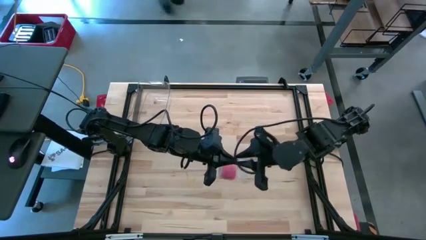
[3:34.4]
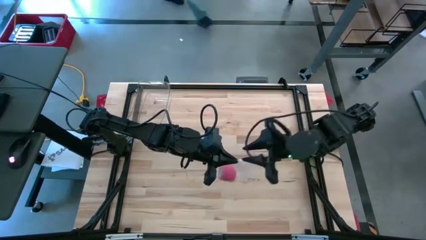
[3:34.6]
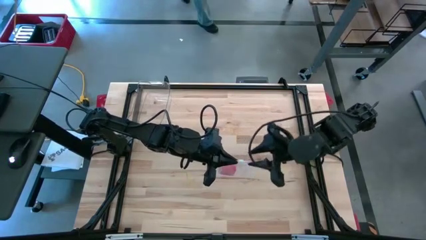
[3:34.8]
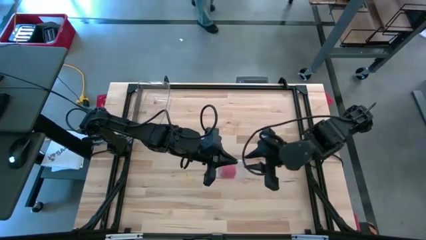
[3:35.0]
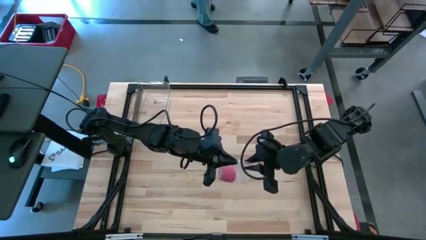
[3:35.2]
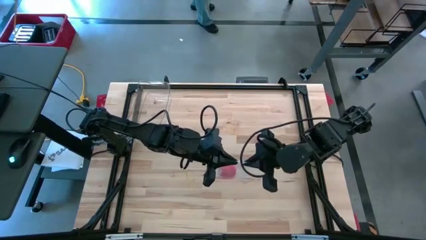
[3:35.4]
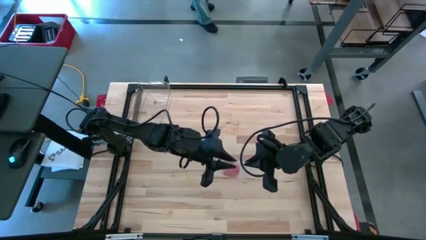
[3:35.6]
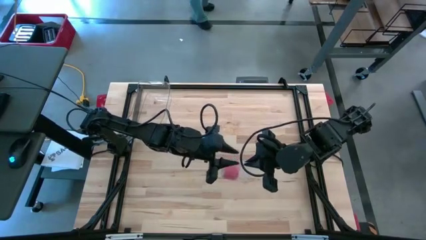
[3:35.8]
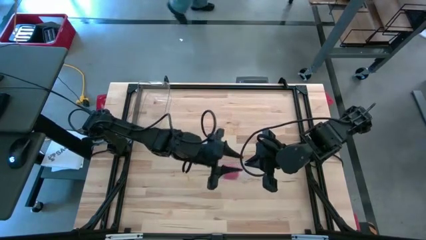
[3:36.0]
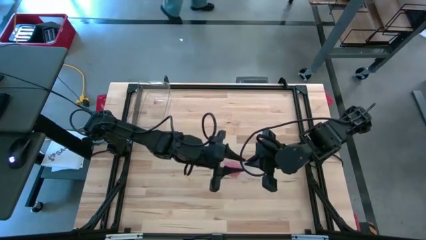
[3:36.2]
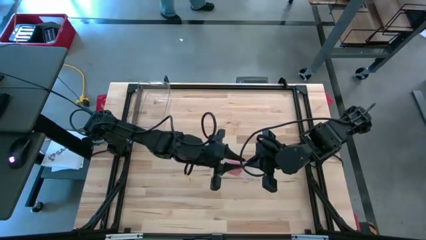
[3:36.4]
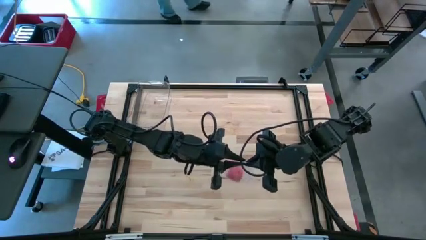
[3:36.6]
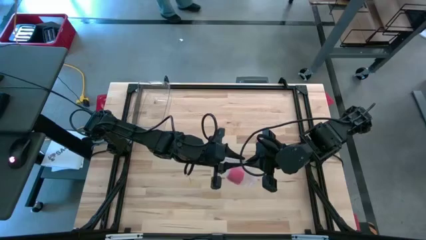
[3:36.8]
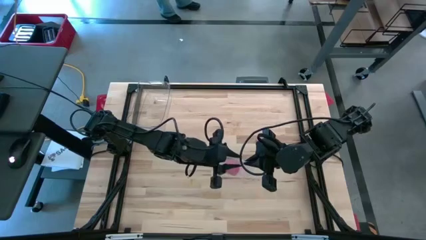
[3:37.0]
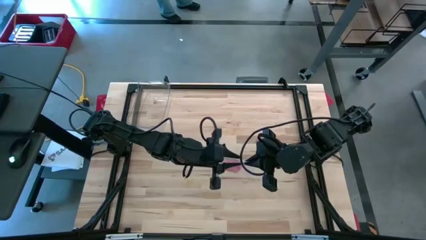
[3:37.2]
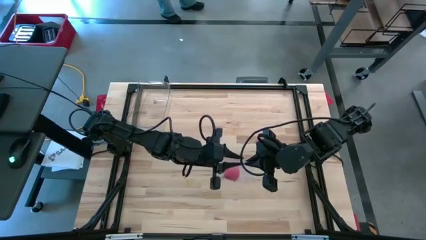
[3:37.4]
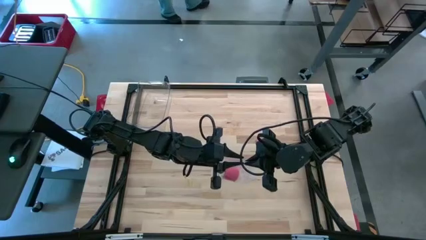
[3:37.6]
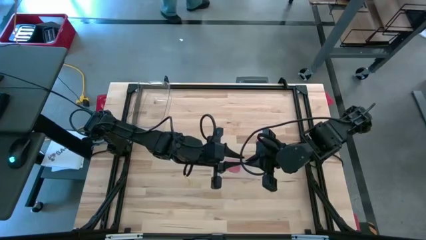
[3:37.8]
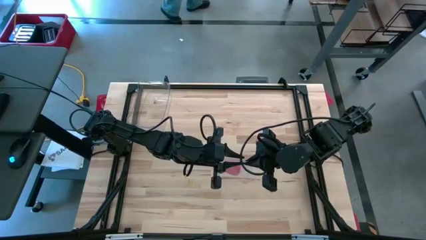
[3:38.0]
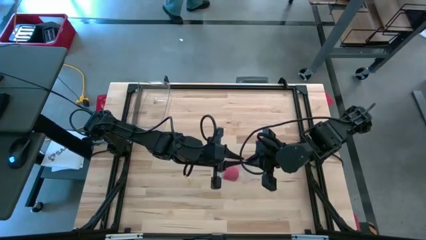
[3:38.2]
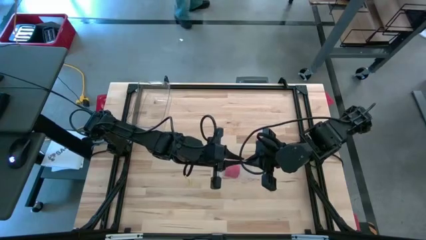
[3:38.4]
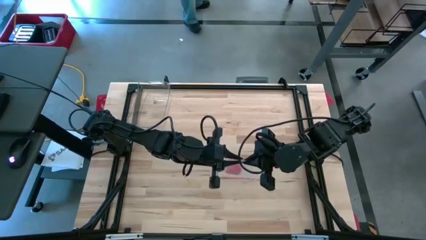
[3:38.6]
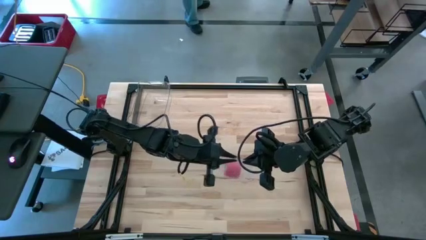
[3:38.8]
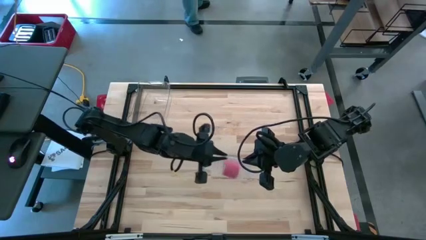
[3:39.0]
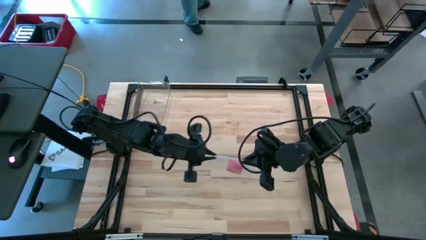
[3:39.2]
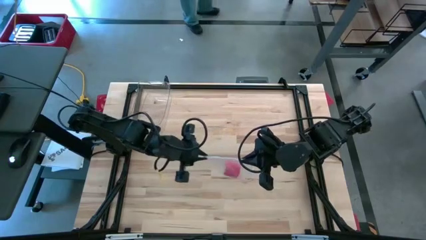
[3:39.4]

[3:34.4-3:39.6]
Task: Roll bandage
Close the transparent zip bag

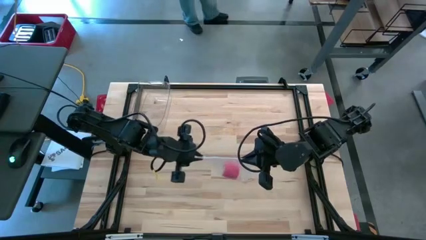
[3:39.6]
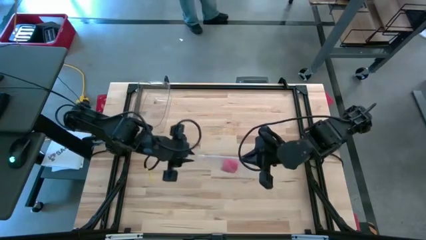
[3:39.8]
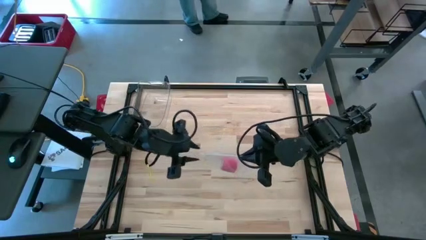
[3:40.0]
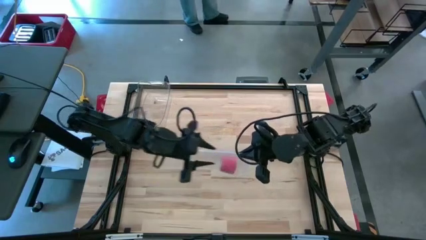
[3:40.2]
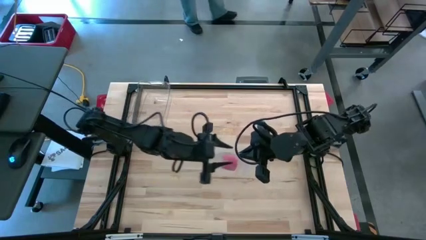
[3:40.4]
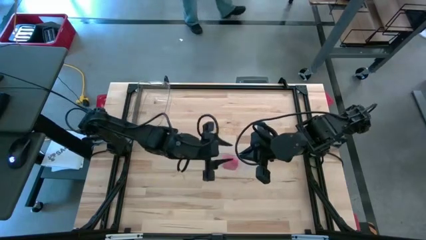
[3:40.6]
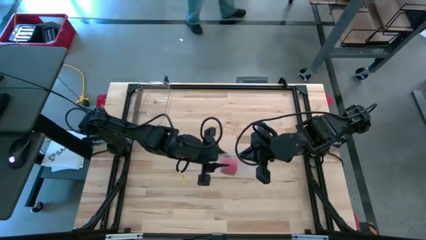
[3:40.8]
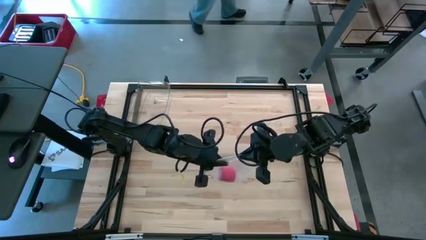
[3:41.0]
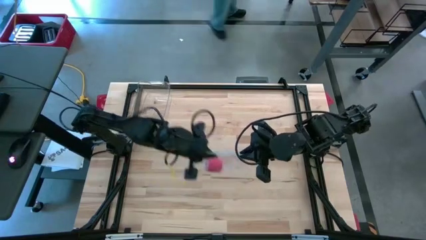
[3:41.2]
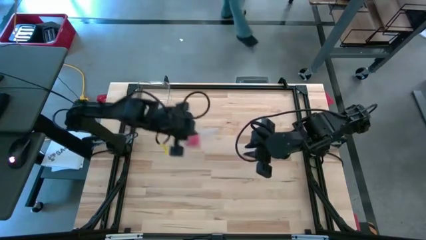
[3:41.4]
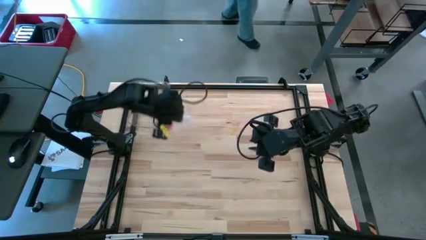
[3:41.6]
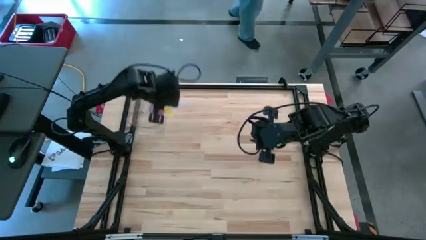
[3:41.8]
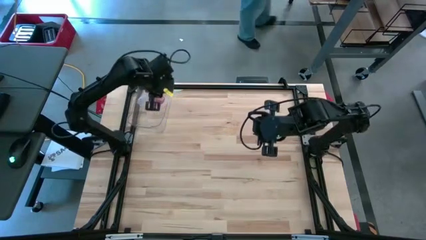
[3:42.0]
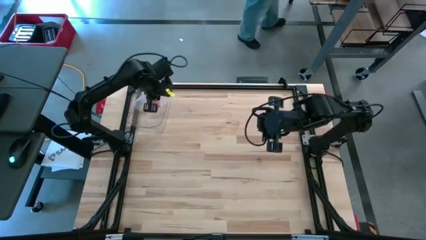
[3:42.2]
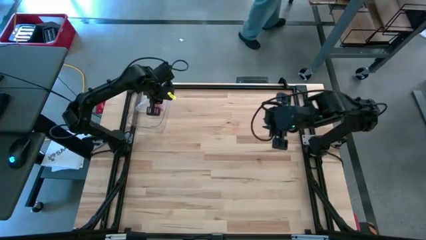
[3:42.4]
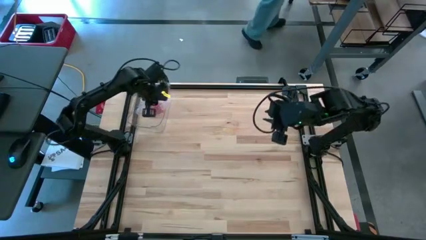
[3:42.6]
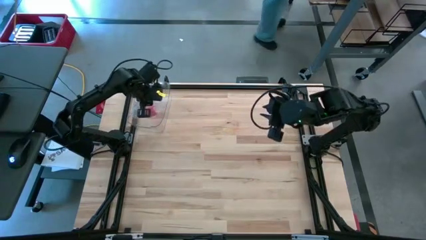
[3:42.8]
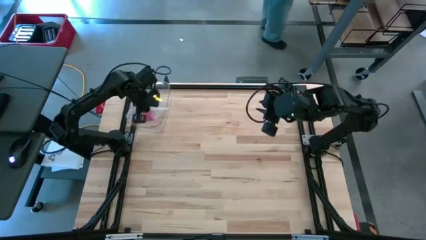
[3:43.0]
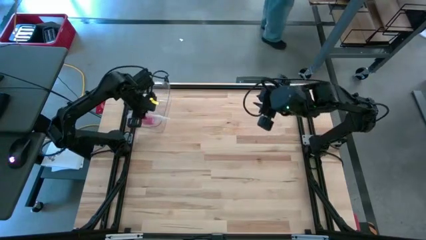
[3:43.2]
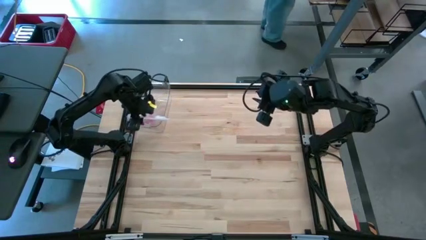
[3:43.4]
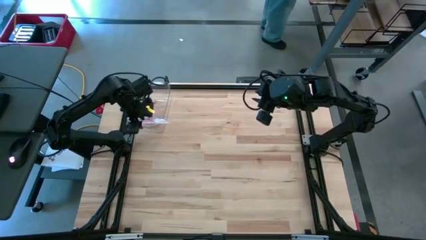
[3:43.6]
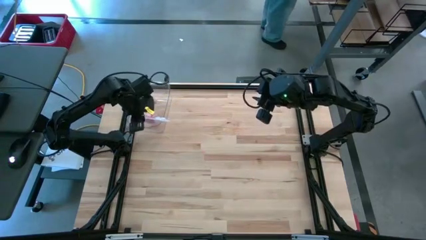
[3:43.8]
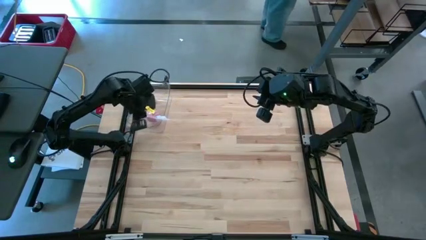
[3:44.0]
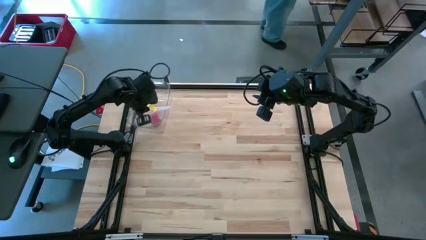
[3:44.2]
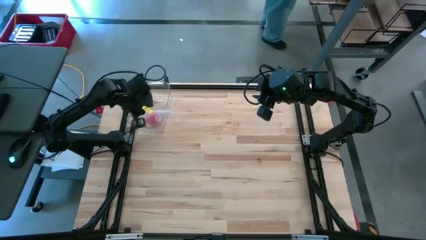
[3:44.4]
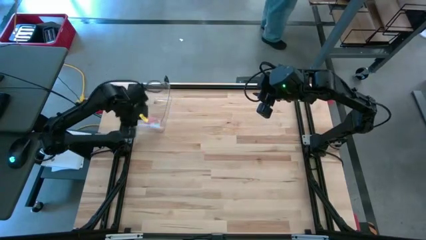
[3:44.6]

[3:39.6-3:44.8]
Put the transparent zip bag into the transparent bin

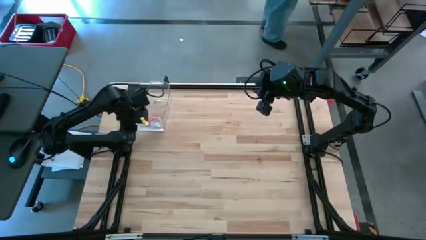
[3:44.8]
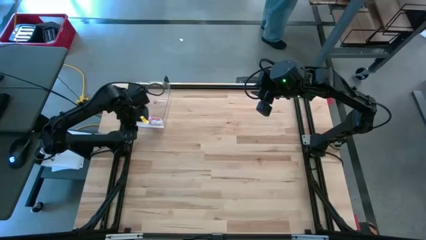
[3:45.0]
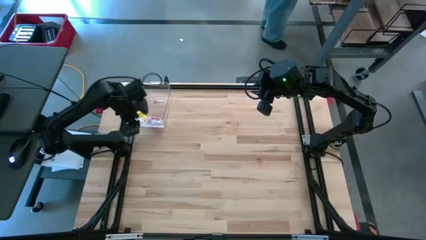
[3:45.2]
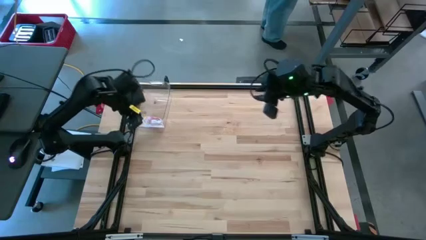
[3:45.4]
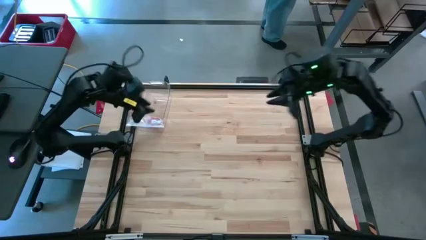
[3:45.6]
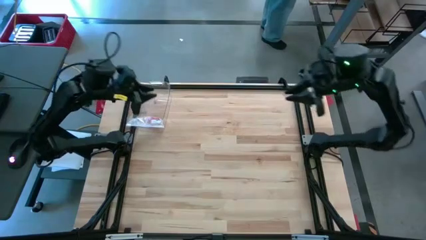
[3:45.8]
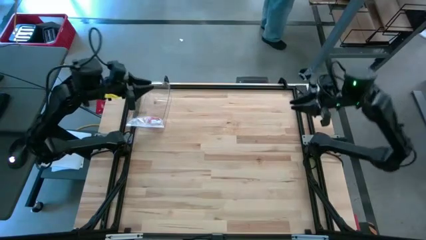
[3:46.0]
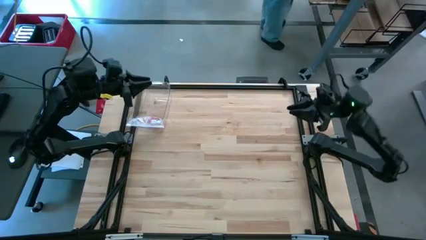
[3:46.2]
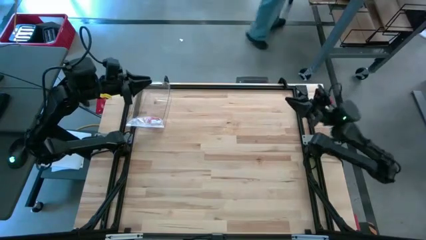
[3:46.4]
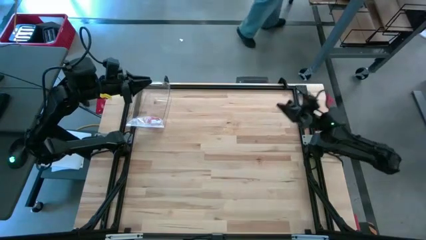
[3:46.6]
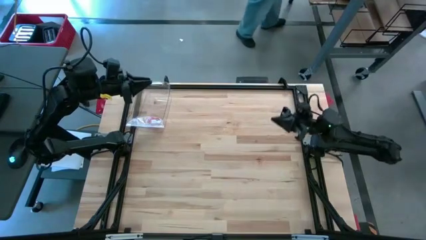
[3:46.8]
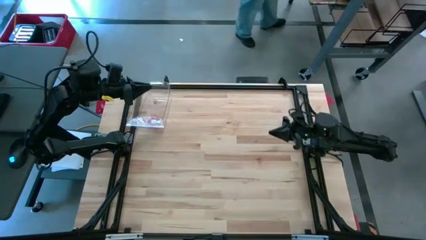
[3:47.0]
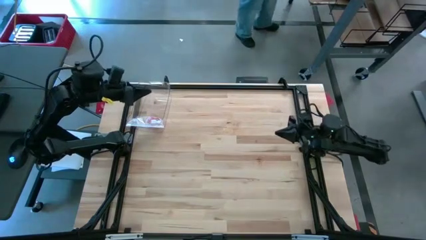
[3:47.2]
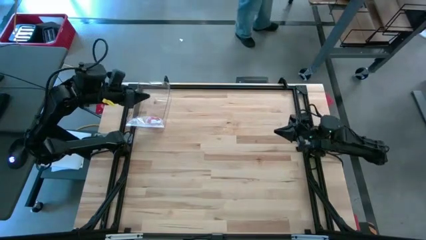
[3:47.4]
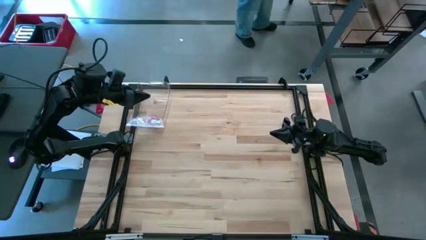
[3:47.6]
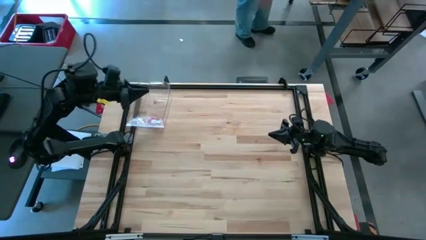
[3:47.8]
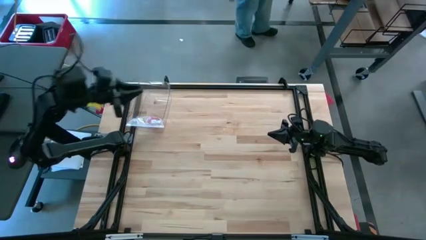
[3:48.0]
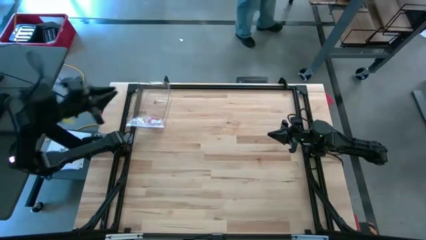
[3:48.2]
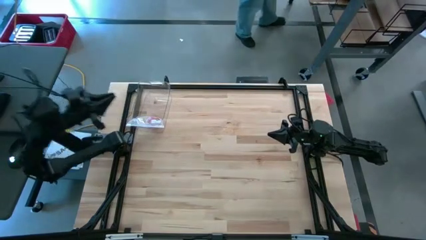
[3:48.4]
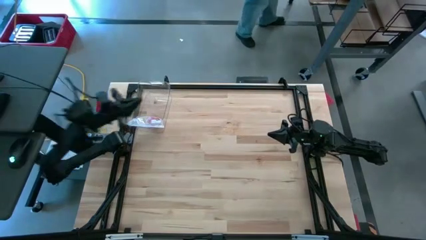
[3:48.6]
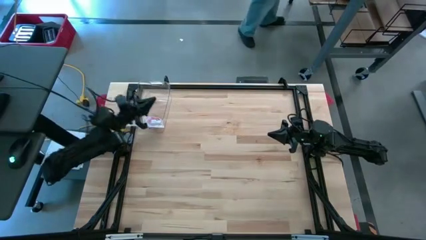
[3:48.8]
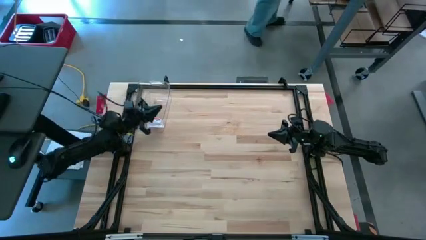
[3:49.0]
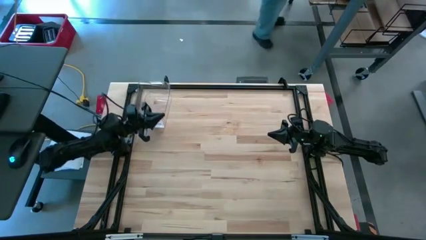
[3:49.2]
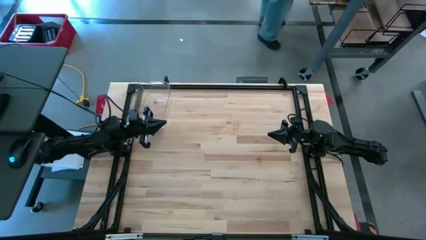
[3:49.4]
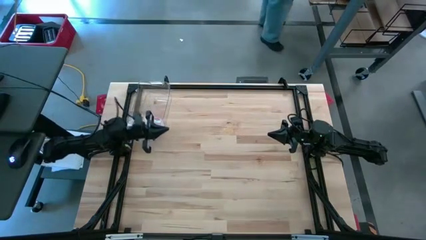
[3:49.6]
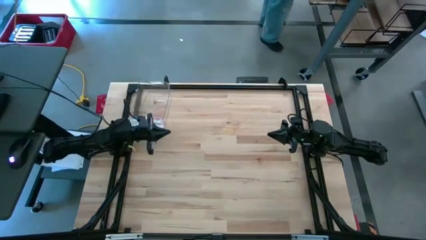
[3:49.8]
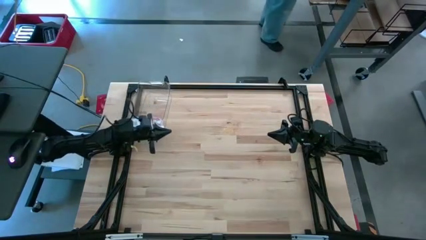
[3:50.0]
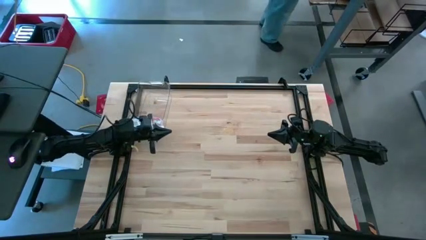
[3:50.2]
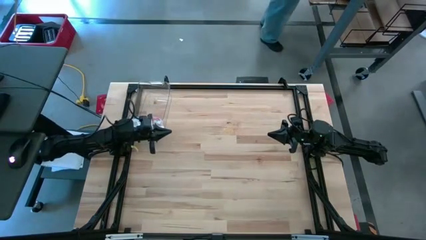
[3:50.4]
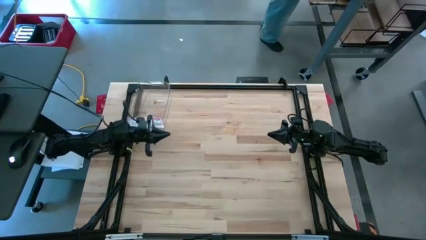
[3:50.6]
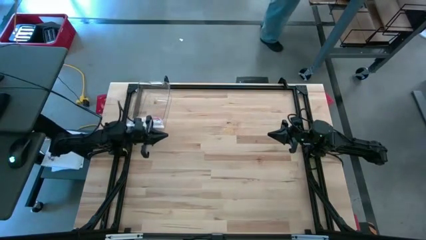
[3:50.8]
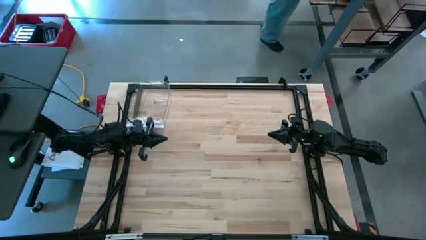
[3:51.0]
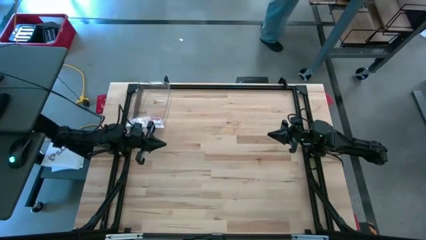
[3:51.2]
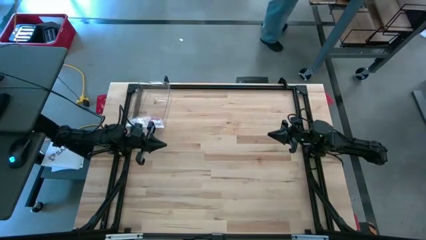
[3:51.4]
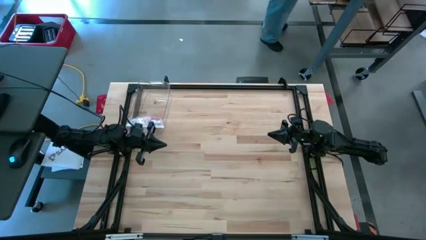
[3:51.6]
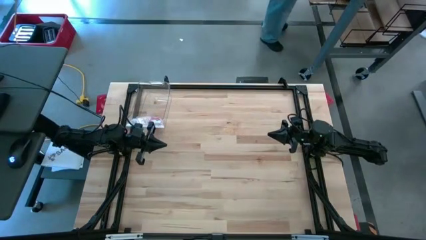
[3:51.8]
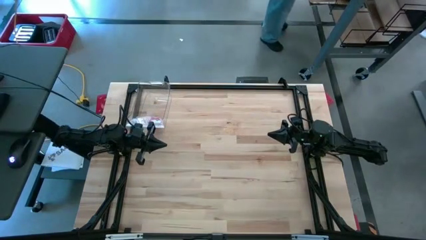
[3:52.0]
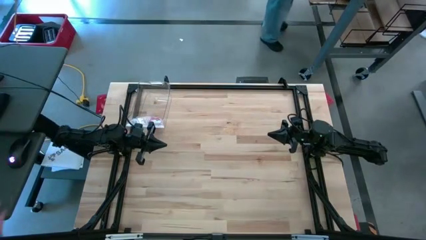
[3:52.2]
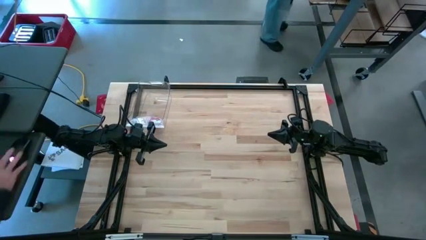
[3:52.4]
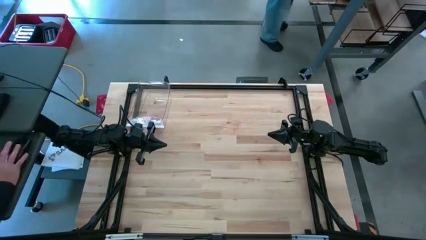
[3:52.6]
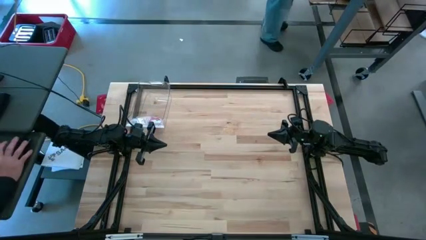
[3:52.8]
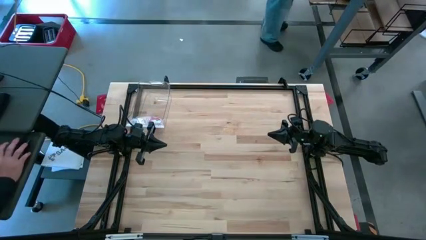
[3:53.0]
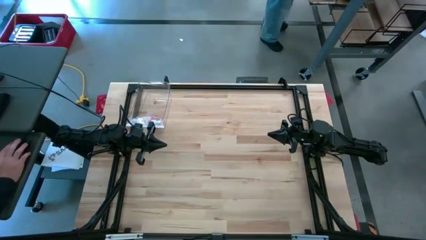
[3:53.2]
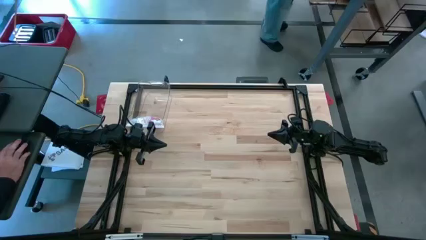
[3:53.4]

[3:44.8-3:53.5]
Return to Home Position
